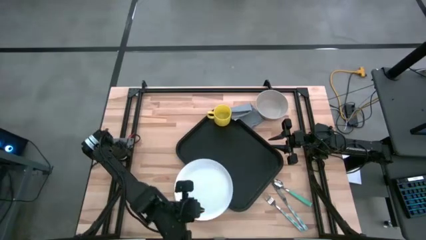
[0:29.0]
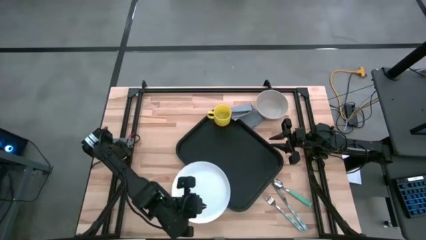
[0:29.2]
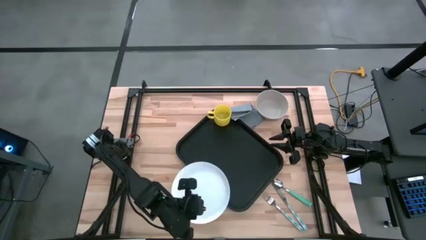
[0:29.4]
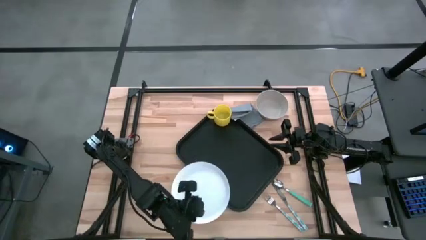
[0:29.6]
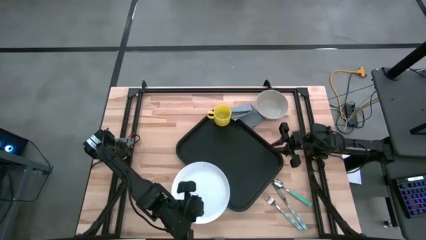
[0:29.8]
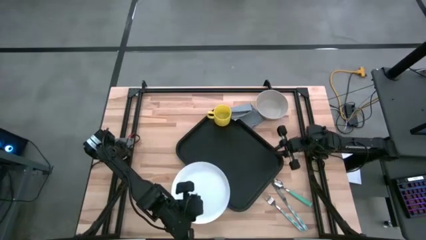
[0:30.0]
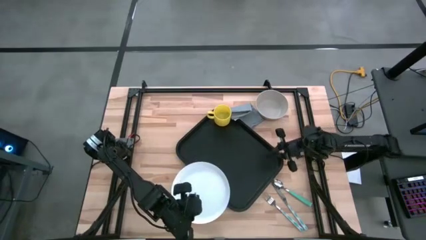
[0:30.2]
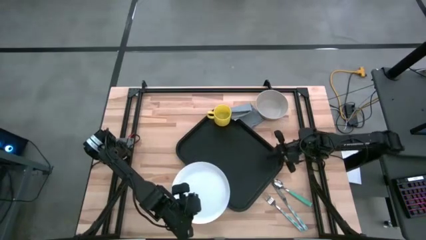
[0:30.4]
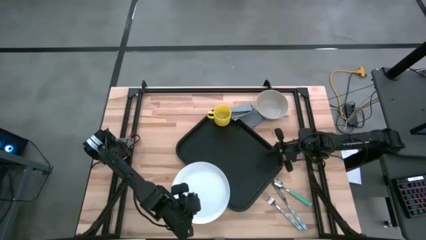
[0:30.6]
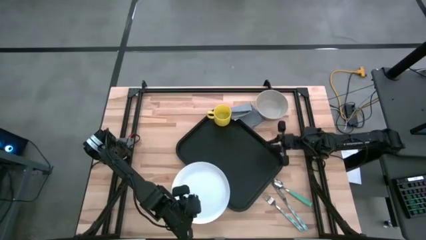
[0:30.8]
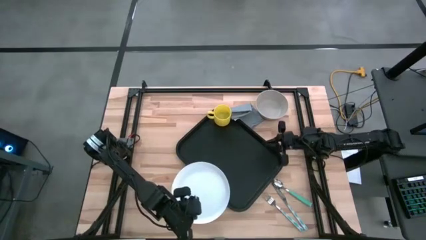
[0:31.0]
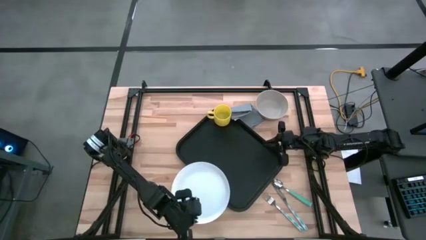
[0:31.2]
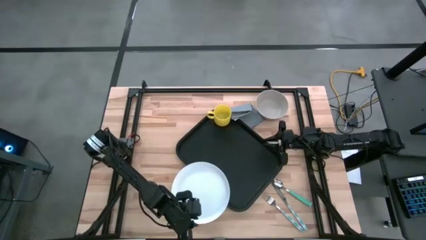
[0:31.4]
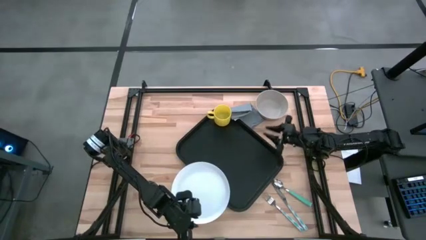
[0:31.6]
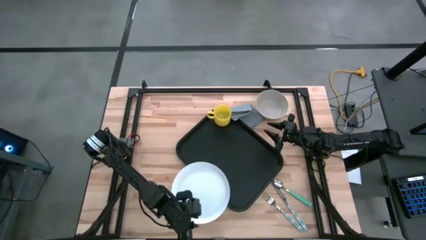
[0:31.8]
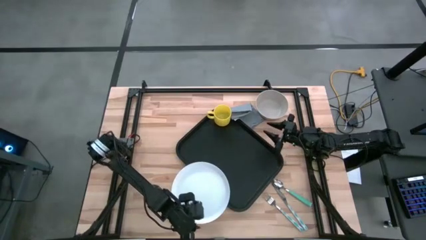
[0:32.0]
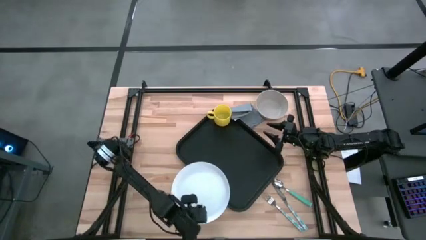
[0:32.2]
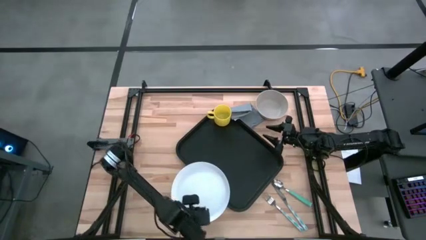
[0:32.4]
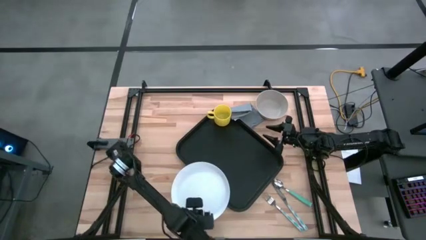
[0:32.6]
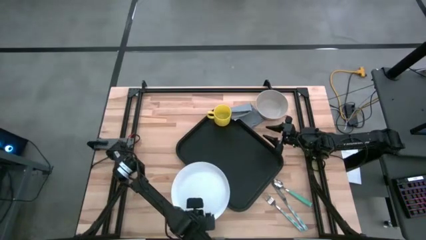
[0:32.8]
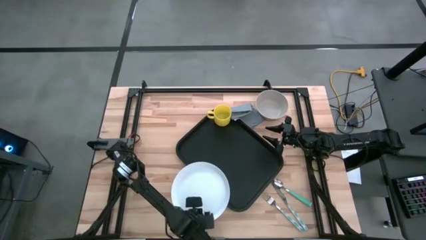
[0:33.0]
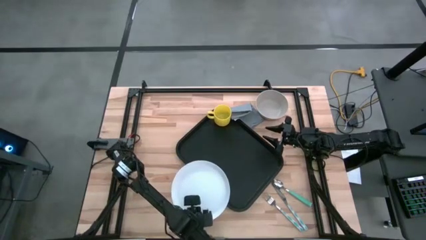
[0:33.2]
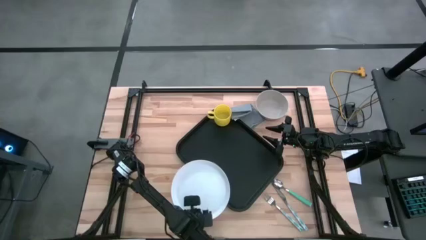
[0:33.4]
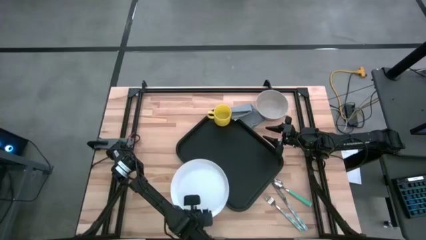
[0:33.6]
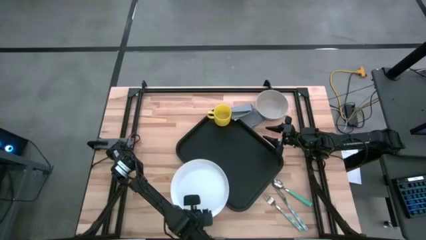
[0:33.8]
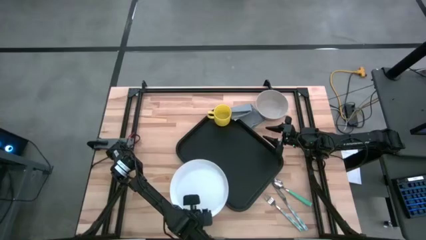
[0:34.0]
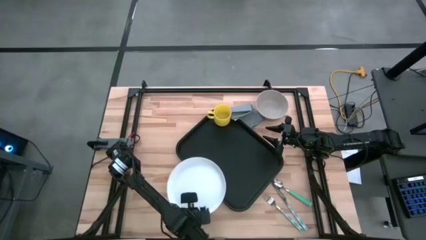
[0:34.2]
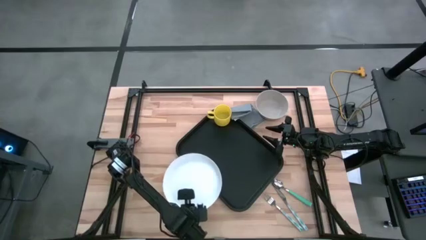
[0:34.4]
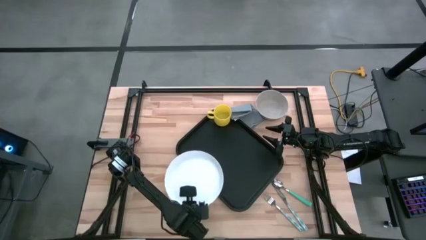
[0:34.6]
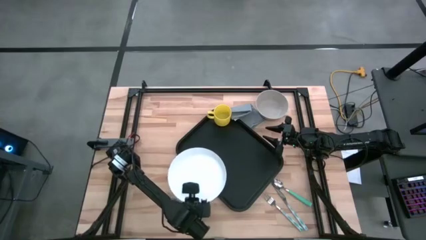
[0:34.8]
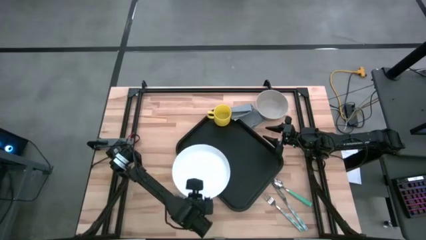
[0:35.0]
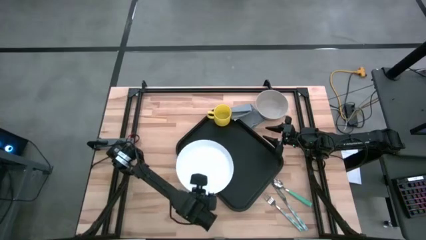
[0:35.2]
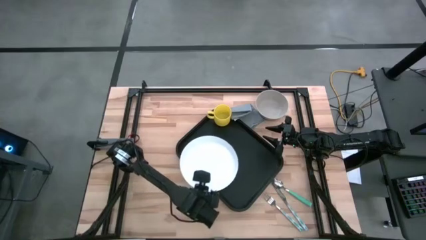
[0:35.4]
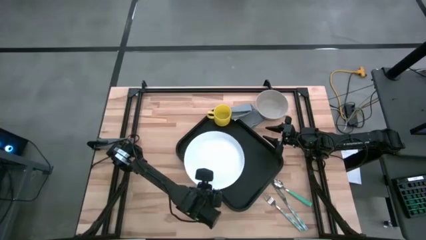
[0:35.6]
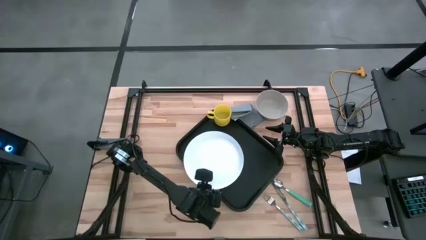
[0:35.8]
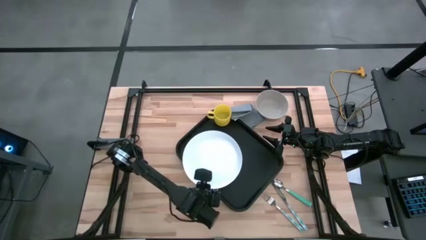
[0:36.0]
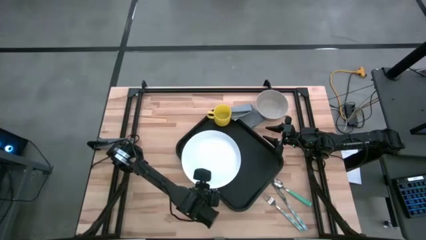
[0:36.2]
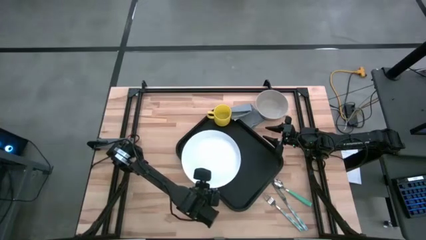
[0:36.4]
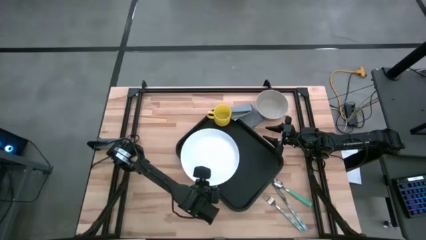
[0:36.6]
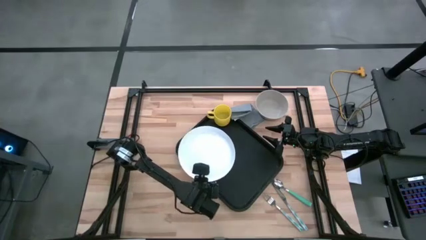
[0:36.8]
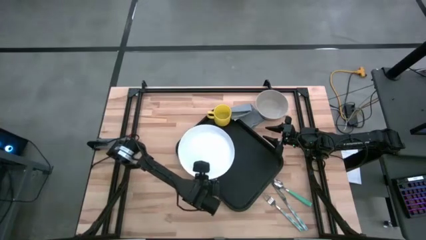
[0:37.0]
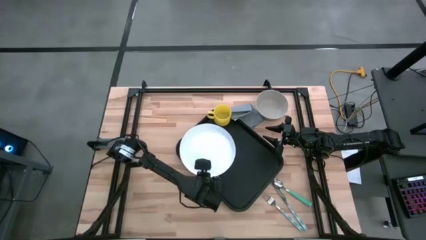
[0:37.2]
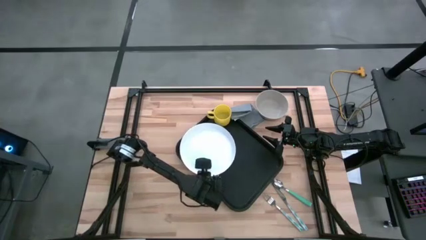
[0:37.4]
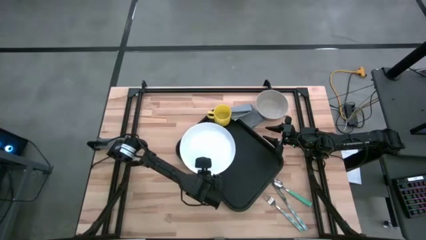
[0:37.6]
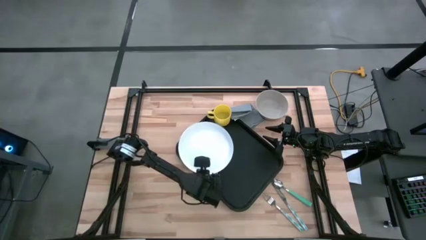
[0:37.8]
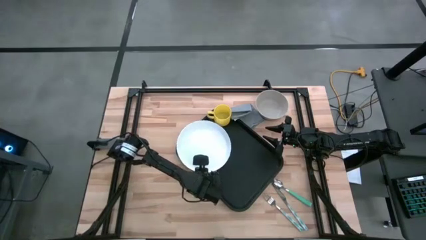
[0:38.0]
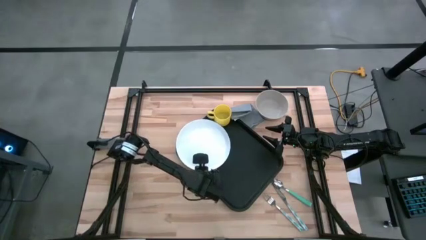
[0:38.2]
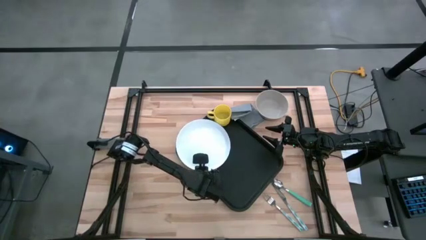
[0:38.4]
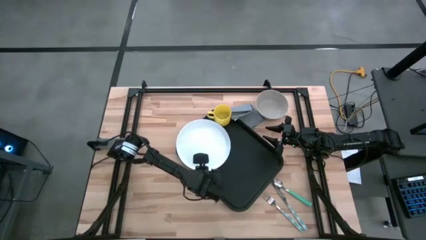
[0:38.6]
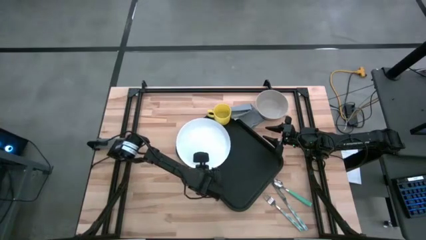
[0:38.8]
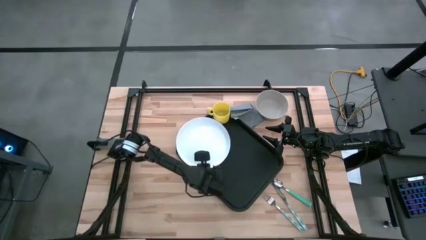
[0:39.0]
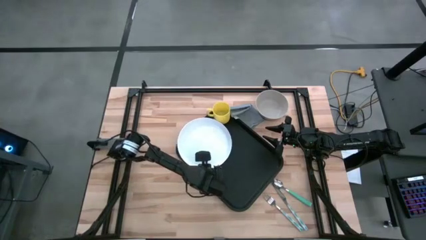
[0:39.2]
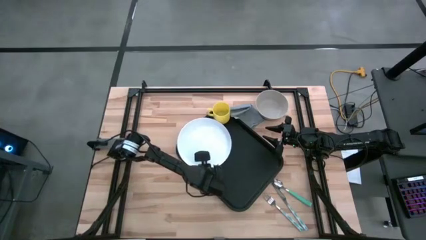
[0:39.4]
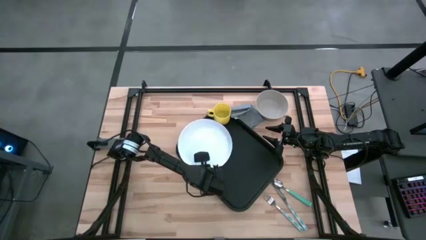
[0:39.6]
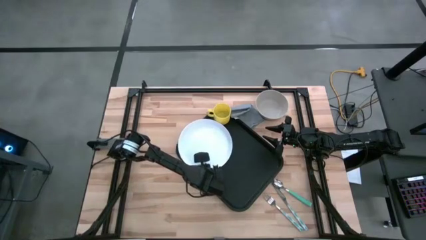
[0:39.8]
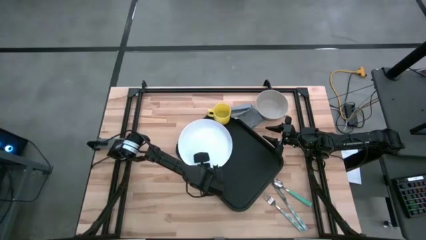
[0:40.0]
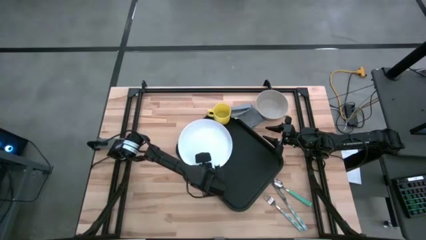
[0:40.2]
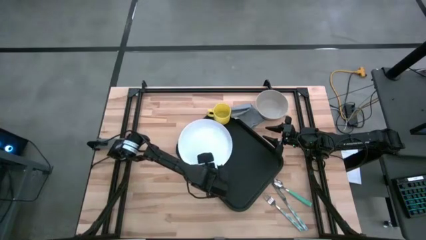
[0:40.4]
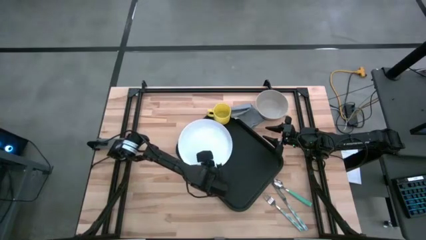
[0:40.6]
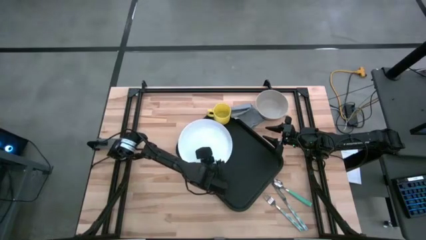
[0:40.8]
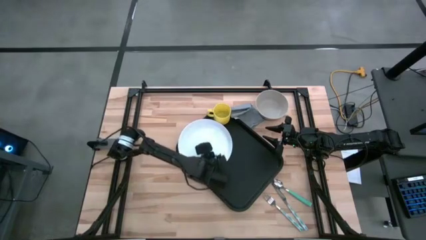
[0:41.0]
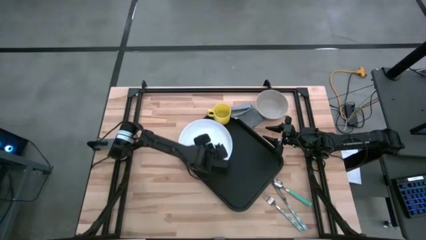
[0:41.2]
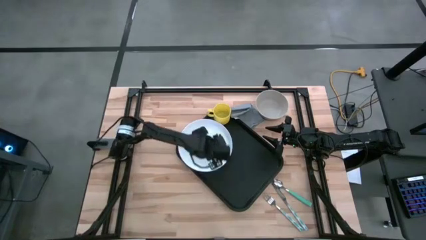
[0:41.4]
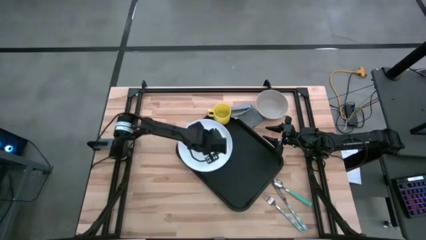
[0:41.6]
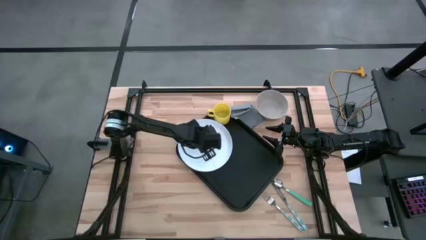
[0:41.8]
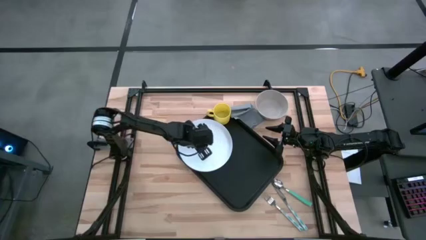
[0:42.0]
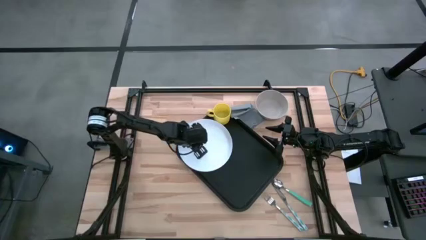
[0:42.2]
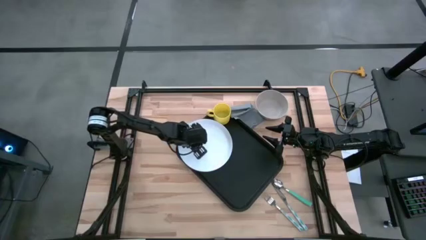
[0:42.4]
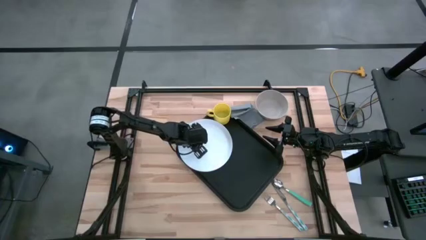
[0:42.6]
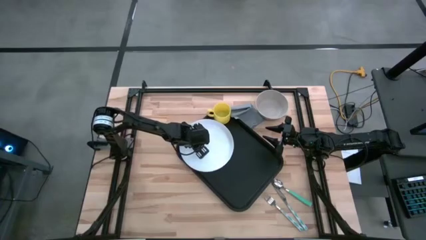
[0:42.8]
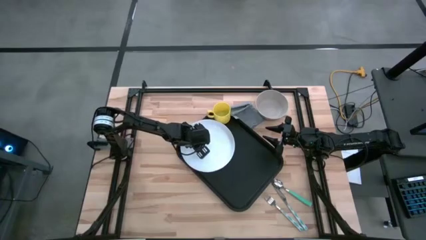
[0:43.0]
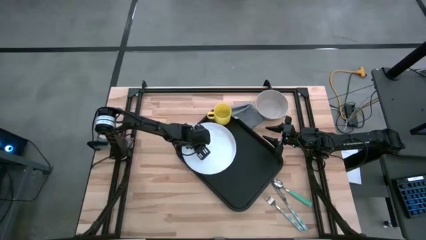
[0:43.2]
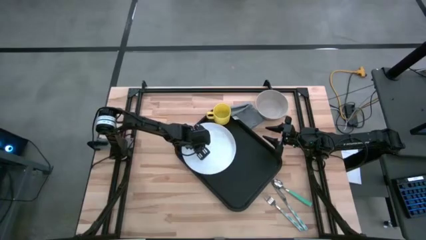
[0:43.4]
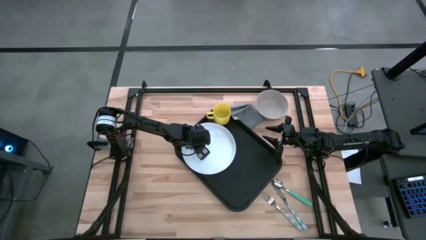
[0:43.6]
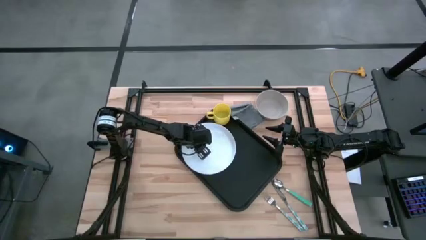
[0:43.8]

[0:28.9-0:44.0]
Task: Set up tray
Put the white plate at the bottom of the yellow mug on the black serving tray

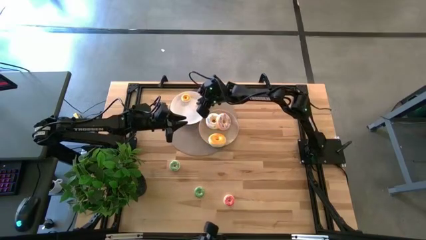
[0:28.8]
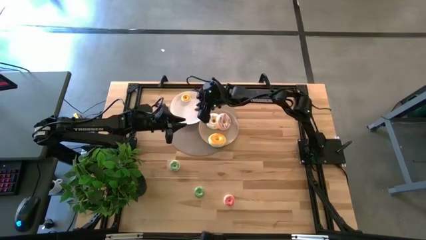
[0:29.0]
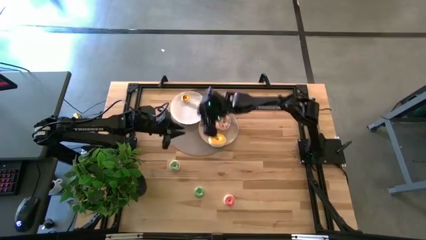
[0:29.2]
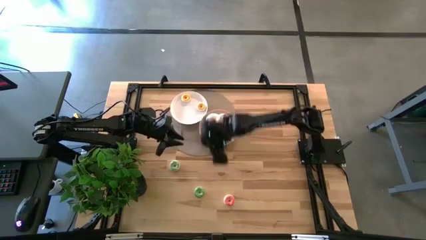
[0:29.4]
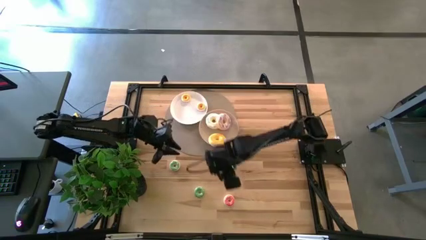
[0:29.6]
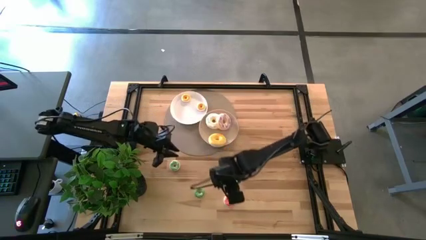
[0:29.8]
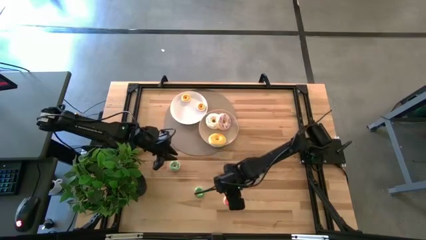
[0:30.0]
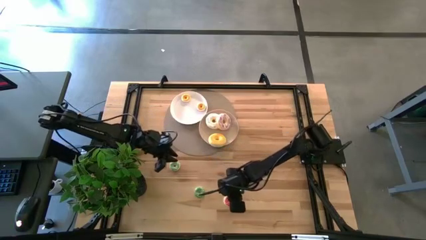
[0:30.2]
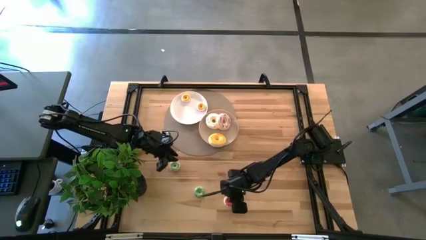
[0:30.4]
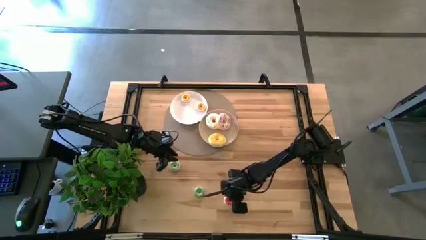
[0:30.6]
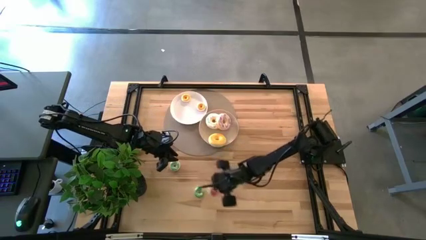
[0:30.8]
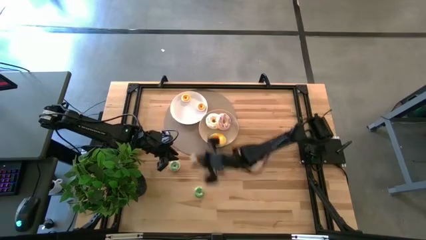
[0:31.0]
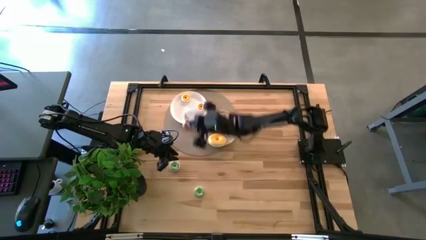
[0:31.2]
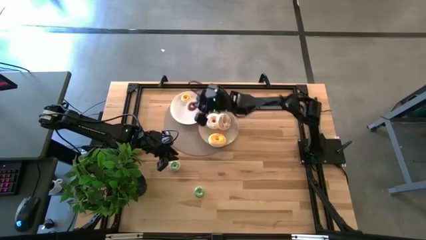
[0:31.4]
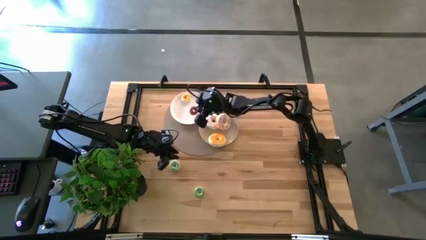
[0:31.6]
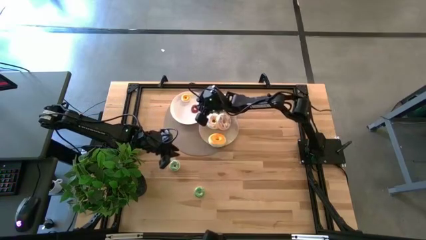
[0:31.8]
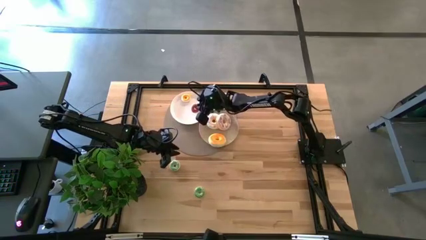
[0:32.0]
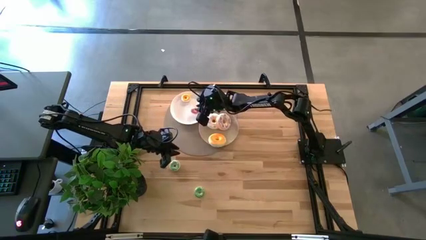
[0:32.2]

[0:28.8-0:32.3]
Task: Pick & Place donuts
Put the small pink doughnut on the white plate
